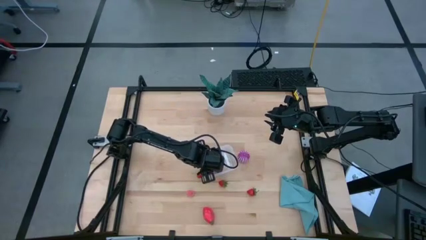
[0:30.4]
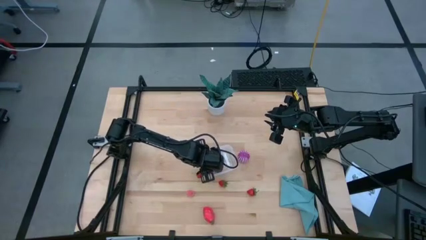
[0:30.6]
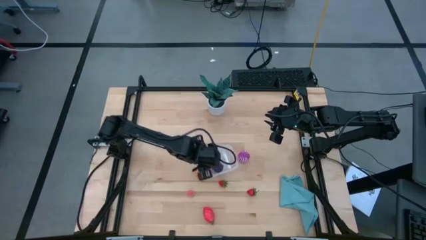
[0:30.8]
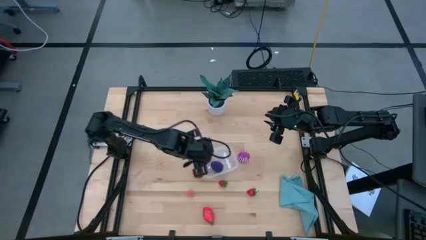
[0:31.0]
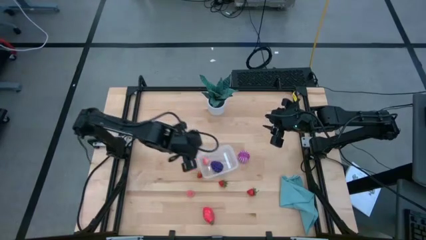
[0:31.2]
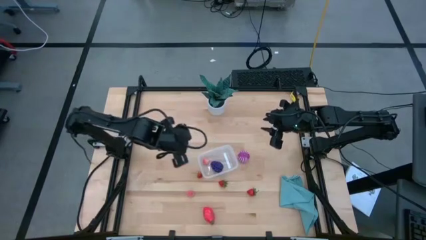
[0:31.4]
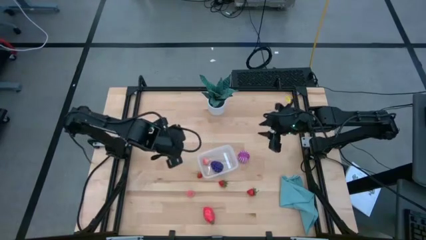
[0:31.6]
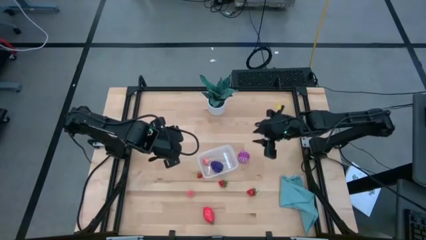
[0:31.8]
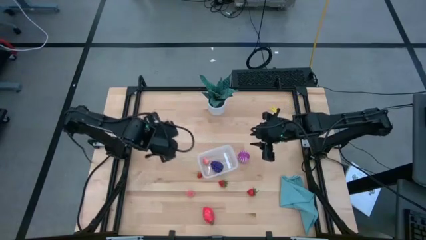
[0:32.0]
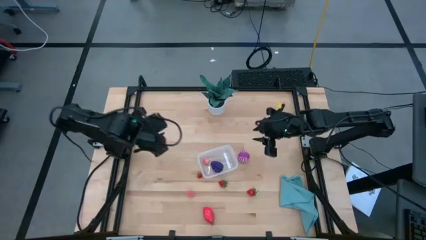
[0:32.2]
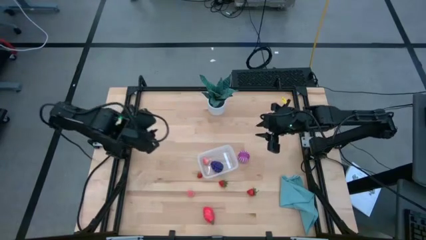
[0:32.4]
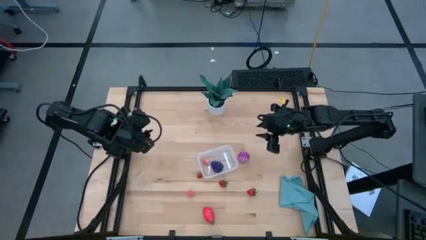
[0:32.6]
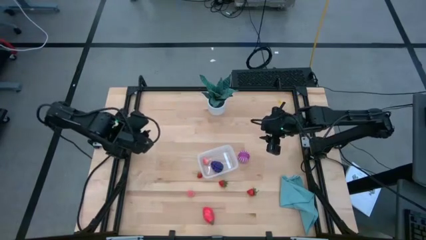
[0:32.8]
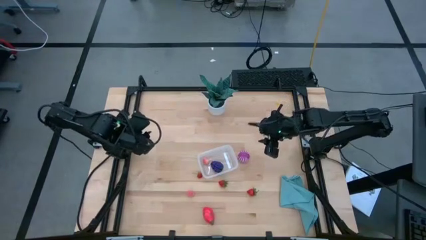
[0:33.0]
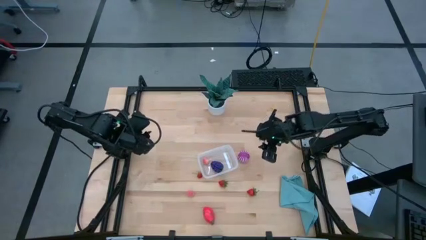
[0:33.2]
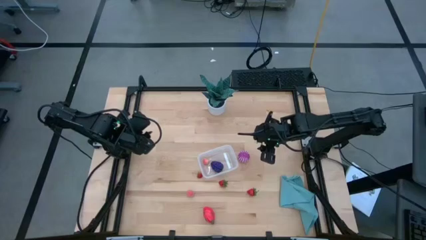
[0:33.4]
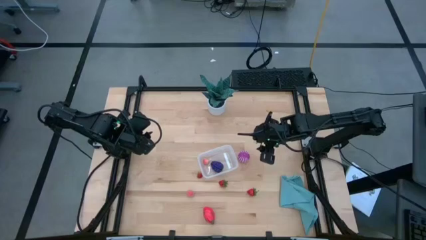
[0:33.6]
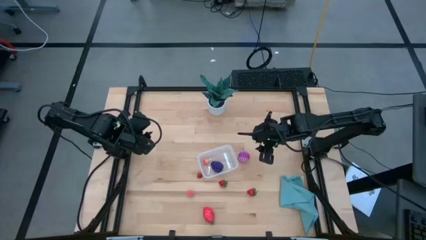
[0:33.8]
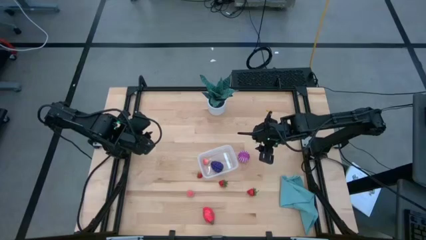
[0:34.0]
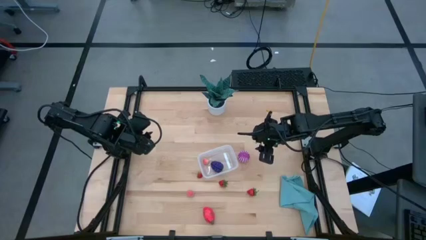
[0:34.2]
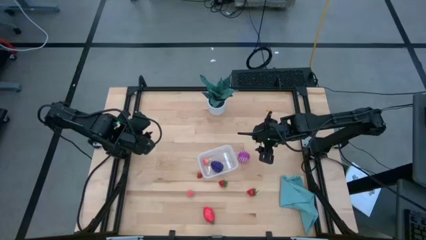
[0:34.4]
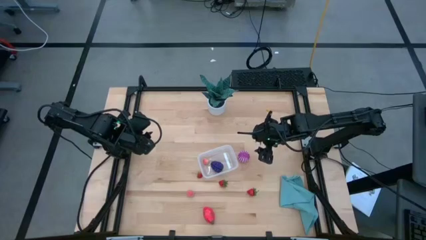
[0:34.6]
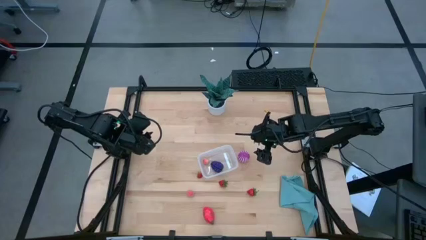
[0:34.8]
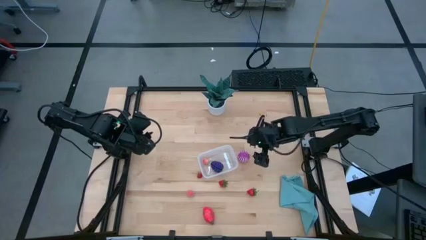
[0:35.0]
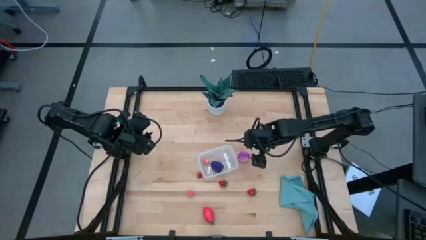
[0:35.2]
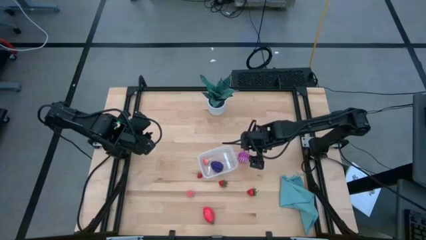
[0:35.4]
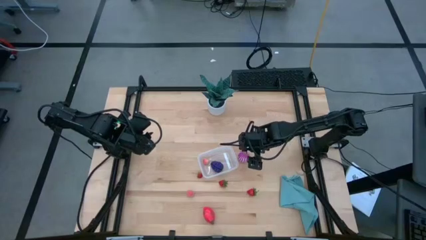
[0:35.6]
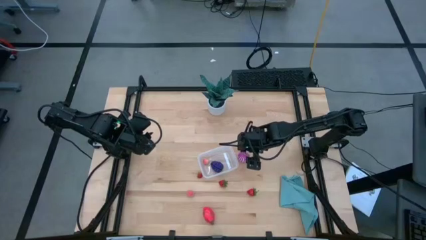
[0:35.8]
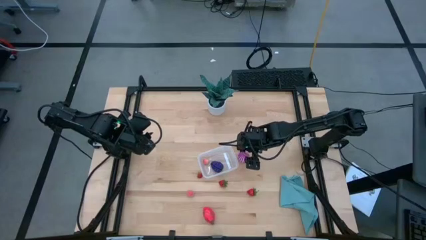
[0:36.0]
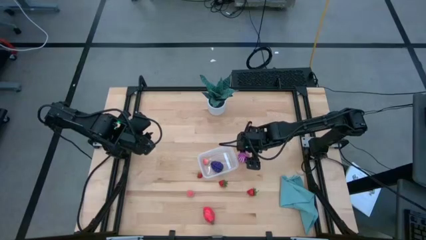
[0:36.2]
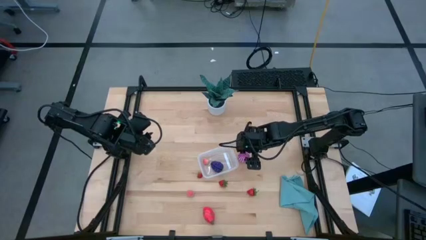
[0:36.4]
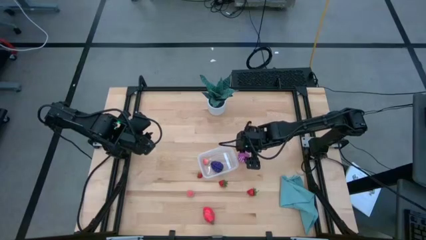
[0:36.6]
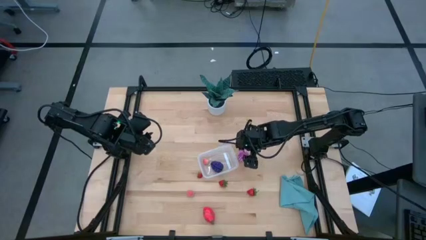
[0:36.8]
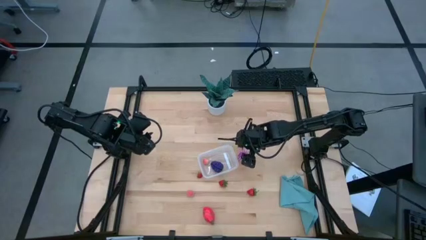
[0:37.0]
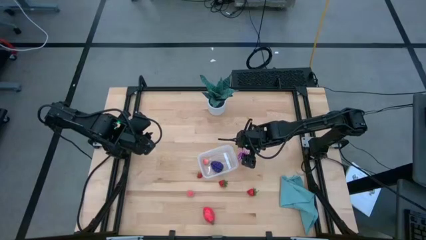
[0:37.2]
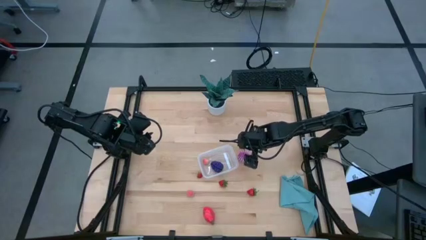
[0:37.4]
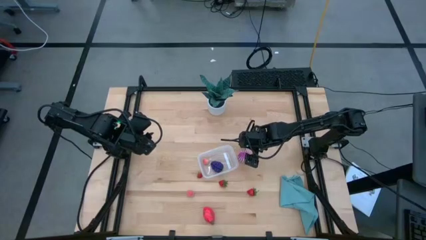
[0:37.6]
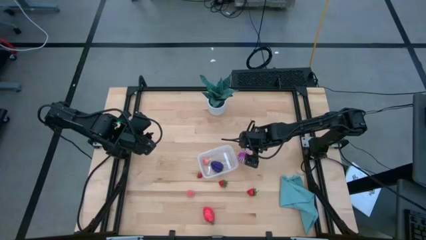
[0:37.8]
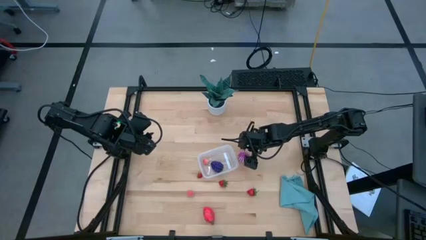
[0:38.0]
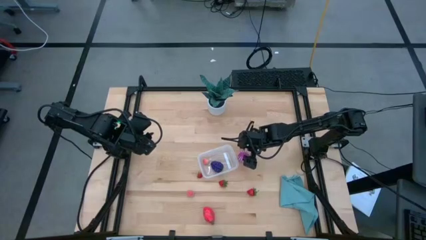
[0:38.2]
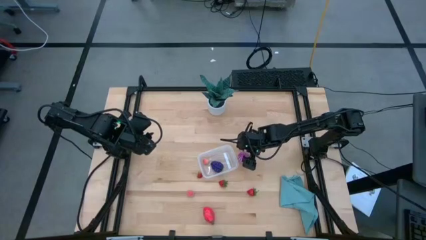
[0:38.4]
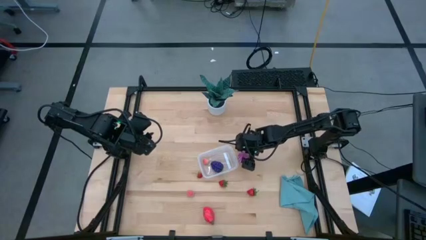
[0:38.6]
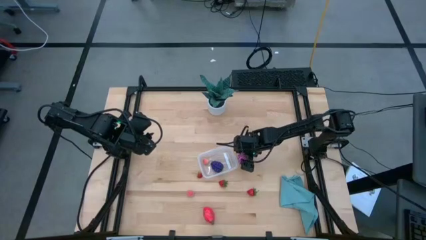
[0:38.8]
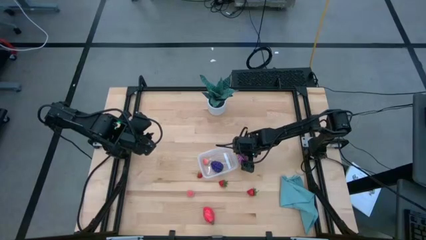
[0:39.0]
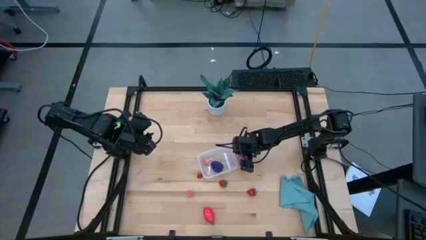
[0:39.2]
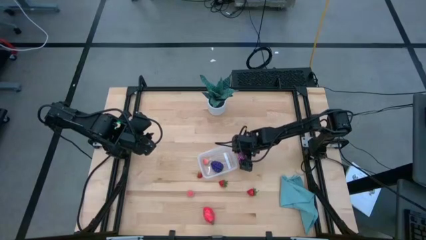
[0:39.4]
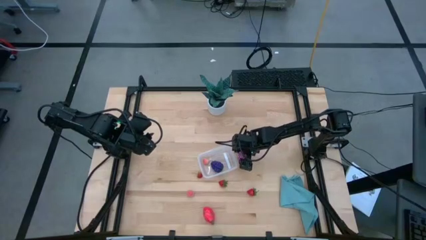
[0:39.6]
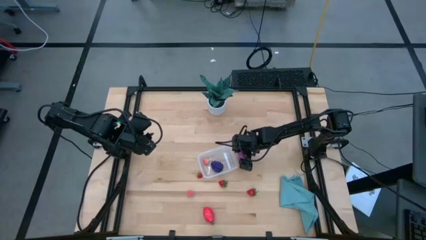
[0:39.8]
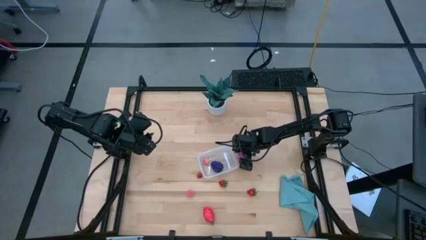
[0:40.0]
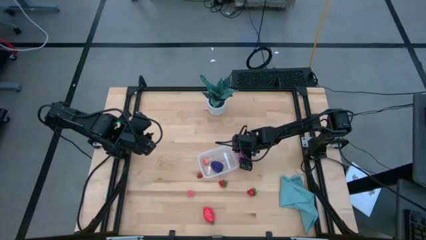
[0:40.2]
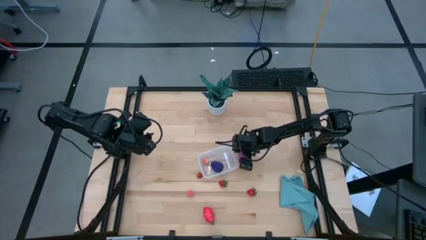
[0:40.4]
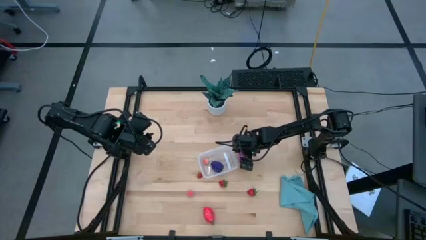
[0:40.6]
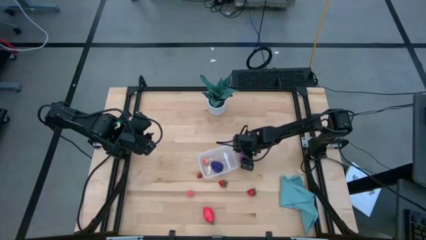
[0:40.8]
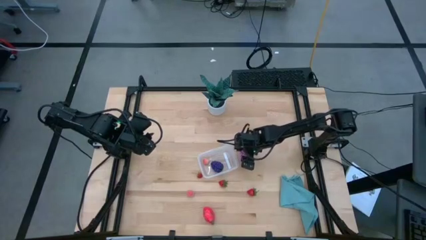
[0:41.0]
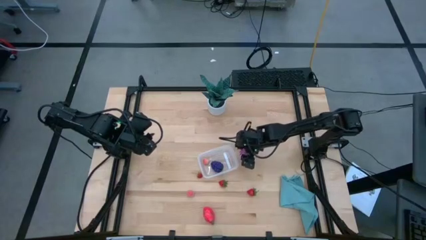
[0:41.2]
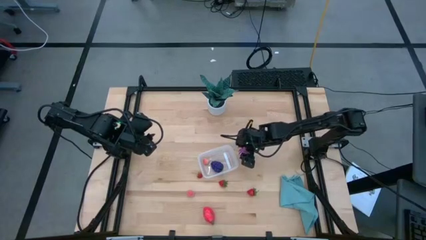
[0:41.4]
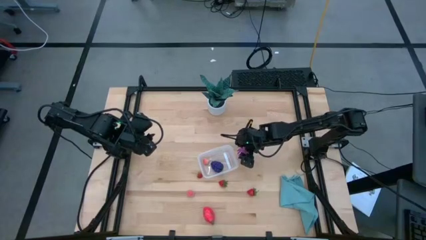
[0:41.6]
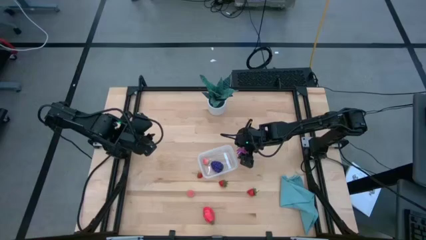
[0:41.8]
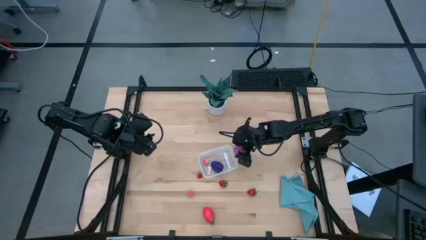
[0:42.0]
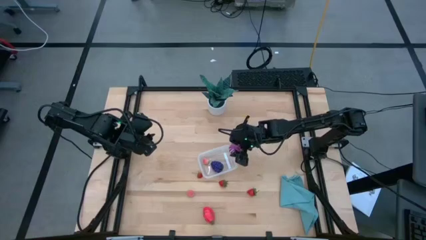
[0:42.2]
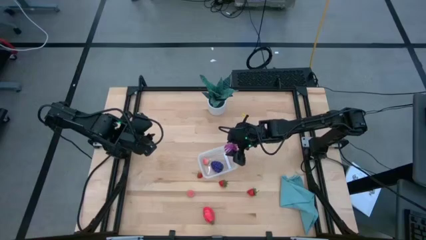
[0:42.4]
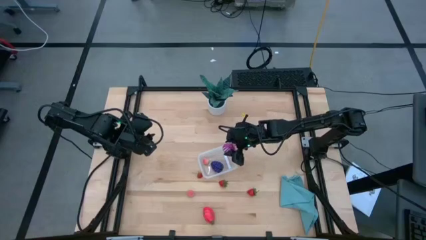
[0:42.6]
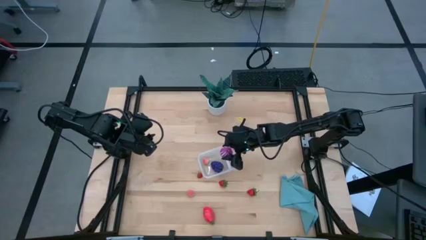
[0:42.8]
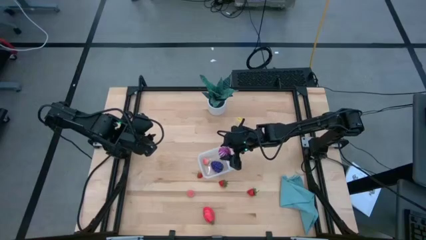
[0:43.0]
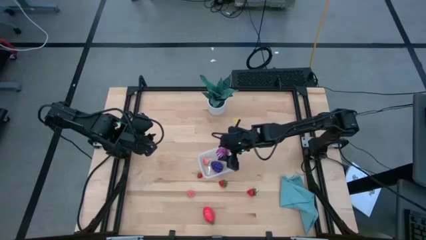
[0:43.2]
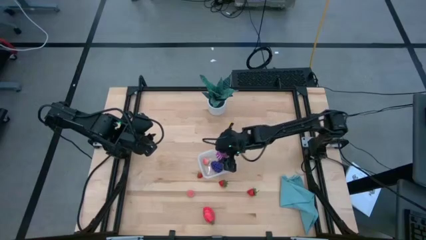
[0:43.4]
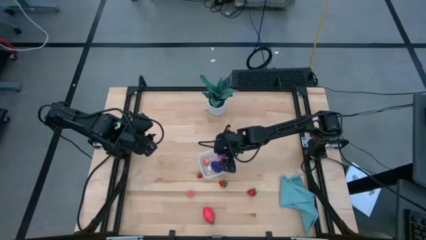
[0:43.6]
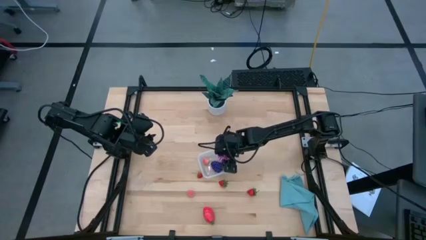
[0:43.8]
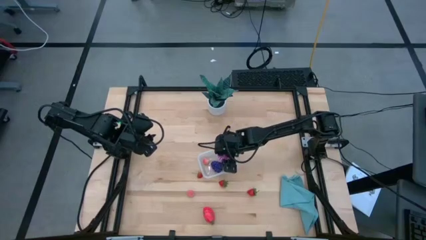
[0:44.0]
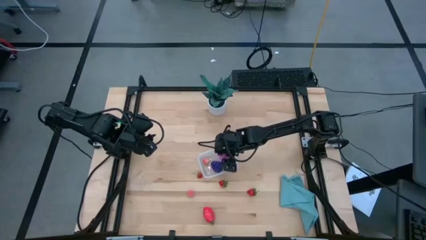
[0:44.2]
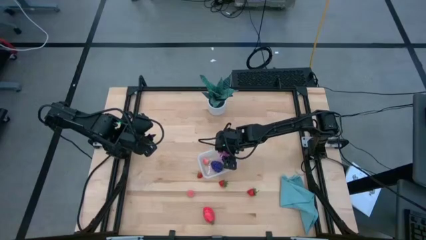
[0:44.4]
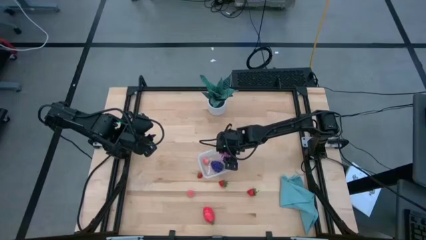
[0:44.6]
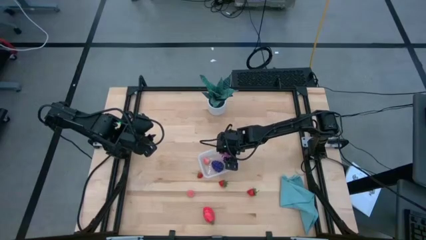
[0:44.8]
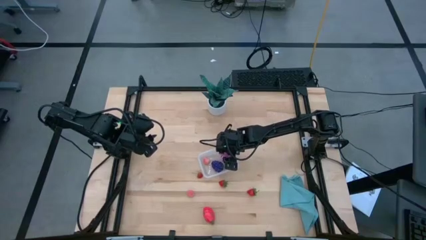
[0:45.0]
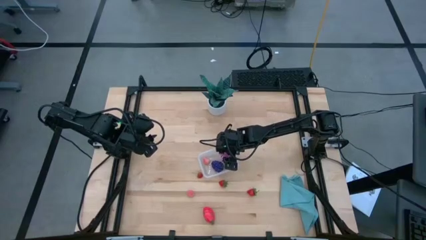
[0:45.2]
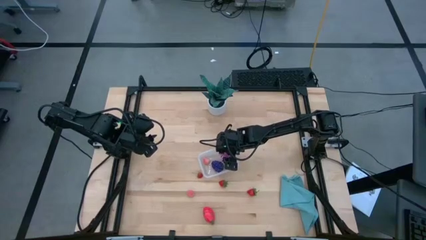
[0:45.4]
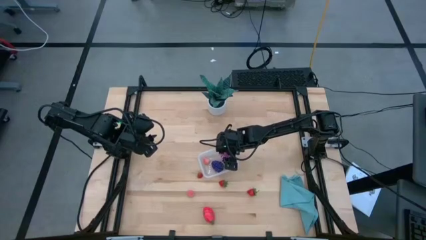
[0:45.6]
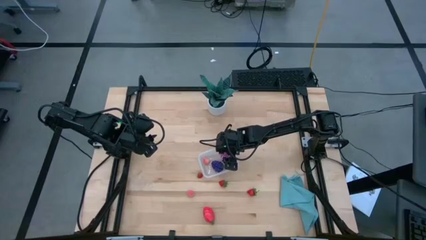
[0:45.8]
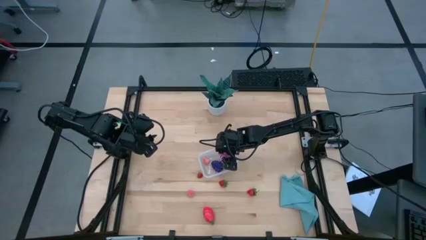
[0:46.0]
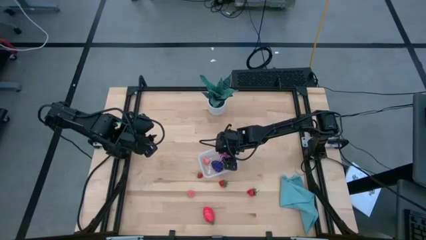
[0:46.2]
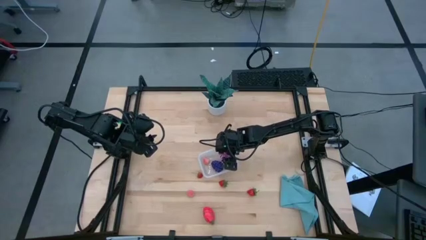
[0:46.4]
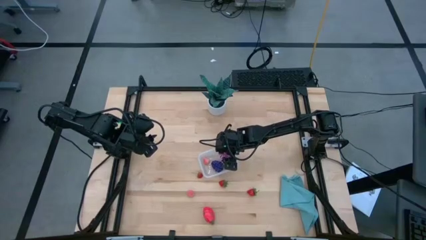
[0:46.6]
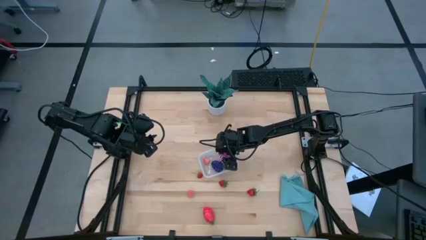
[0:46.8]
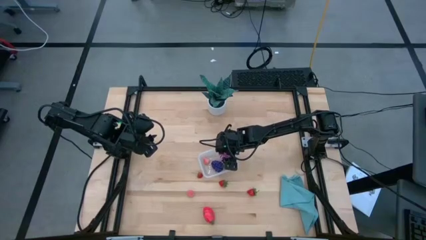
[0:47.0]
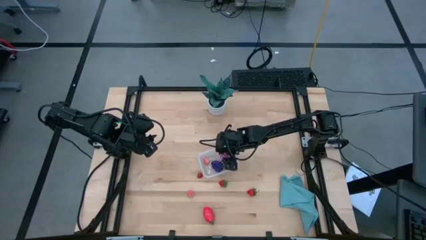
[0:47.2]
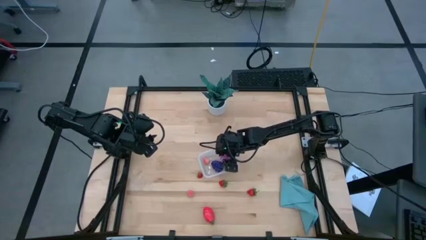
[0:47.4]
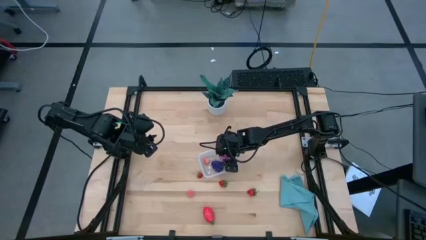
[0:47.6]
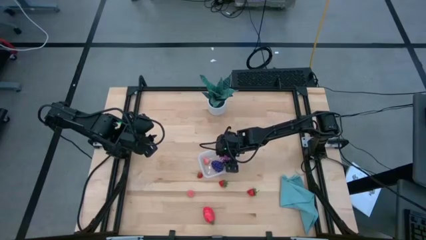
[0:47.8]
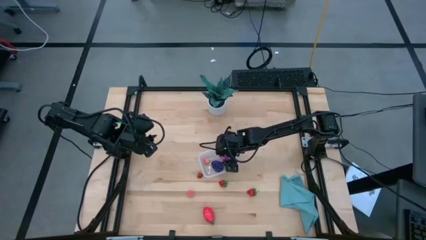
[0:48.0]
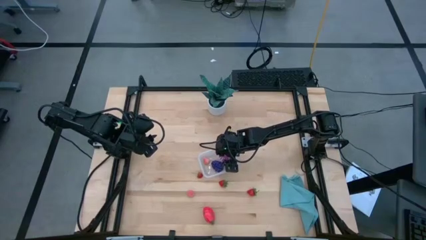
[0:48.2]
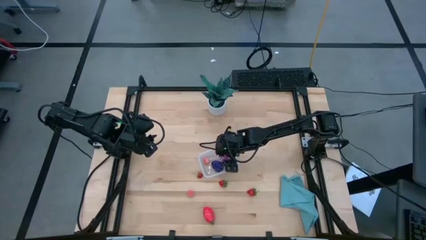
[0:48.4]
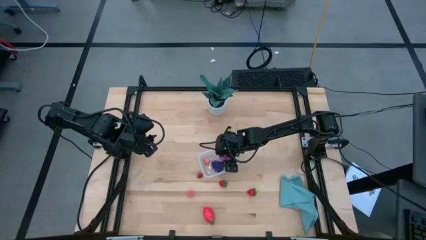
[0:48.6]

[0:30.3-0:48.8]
Task: Pick and placing Produce into tupperware
Put the onion into the transparent bin
